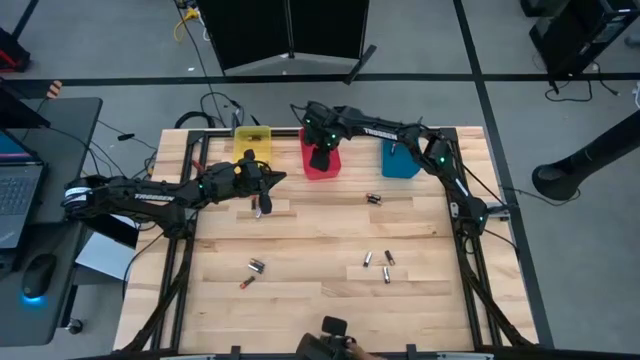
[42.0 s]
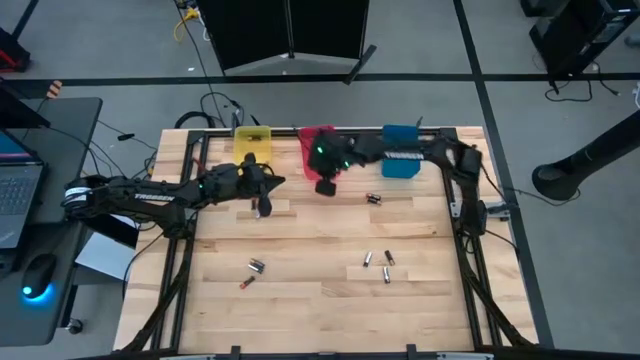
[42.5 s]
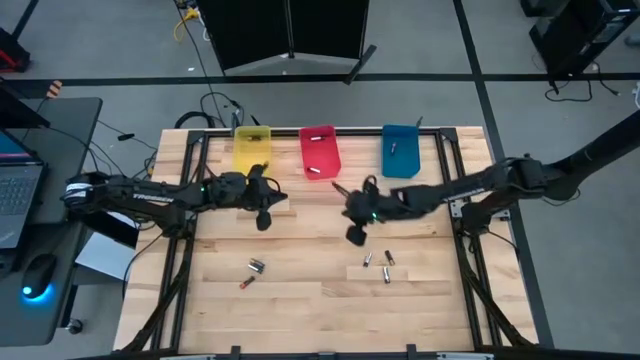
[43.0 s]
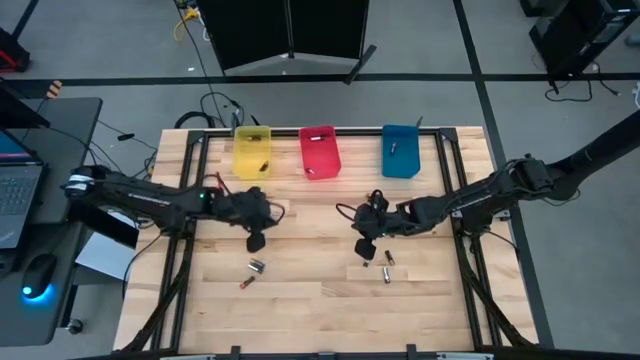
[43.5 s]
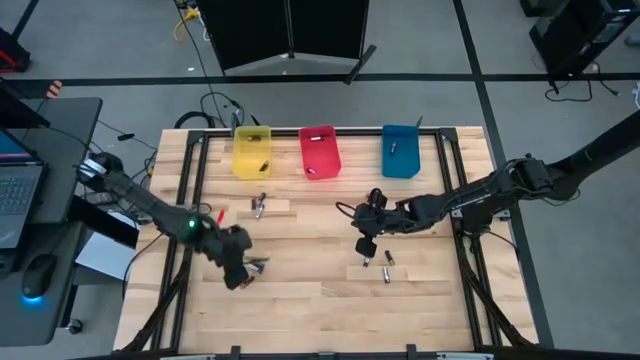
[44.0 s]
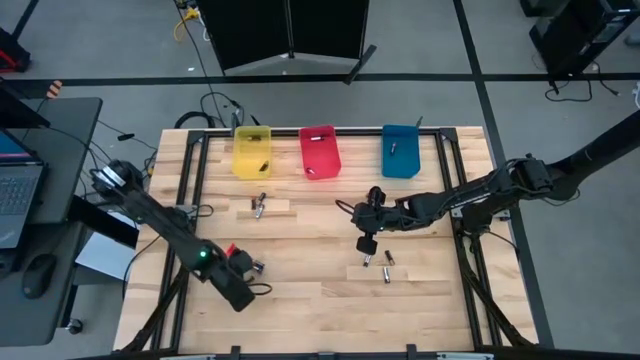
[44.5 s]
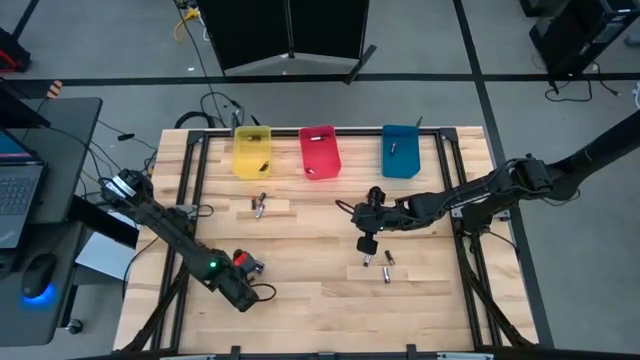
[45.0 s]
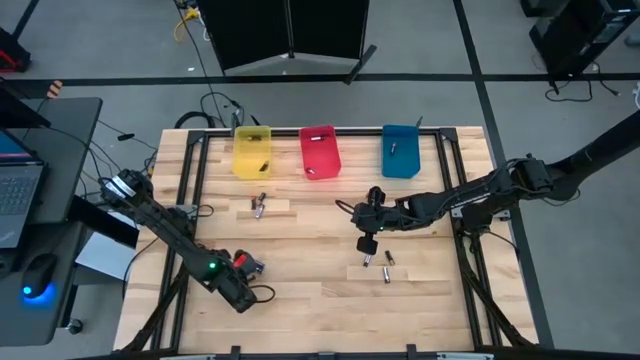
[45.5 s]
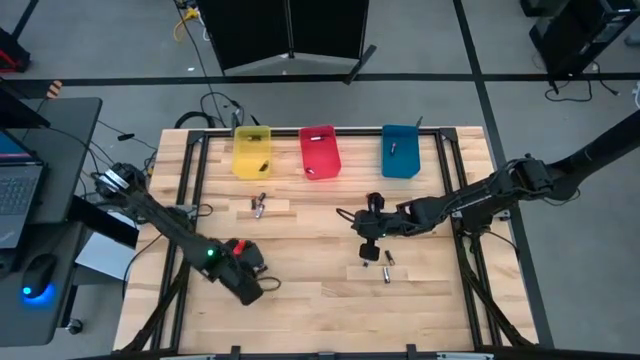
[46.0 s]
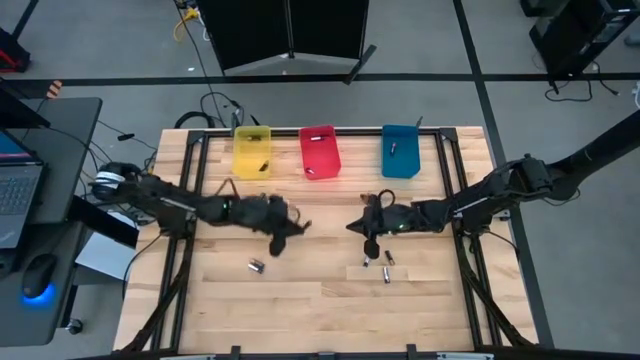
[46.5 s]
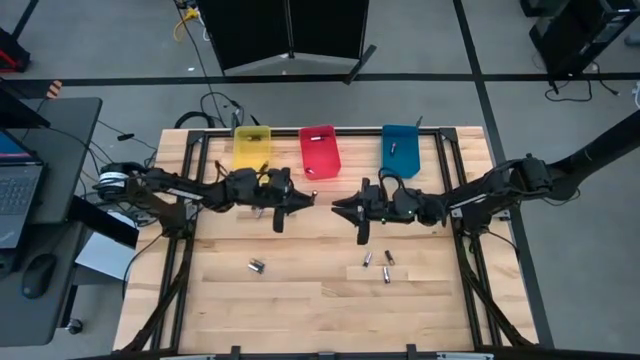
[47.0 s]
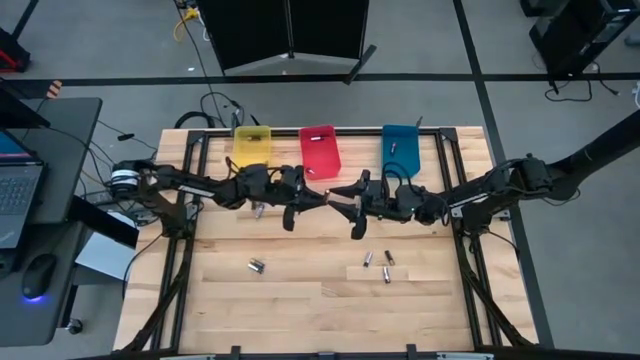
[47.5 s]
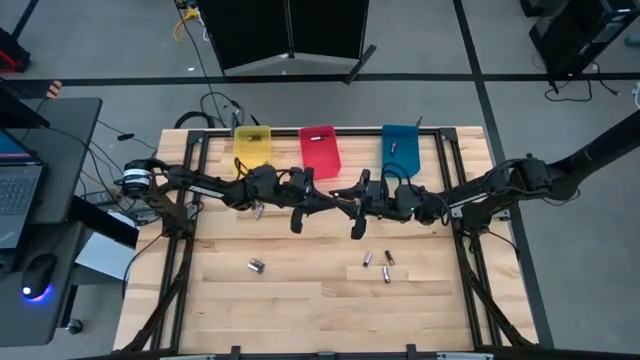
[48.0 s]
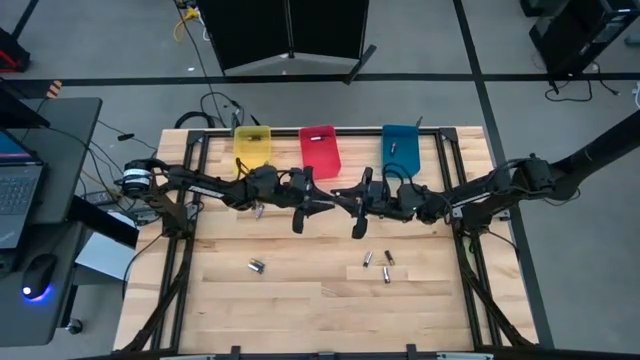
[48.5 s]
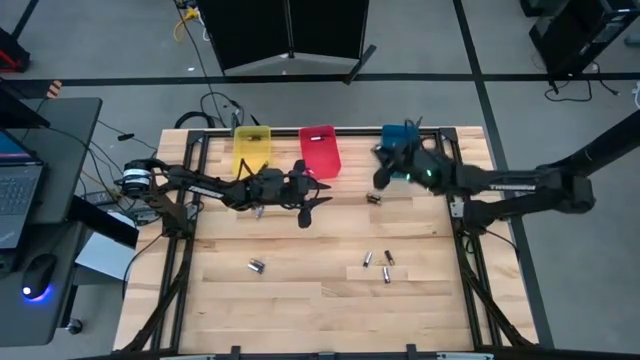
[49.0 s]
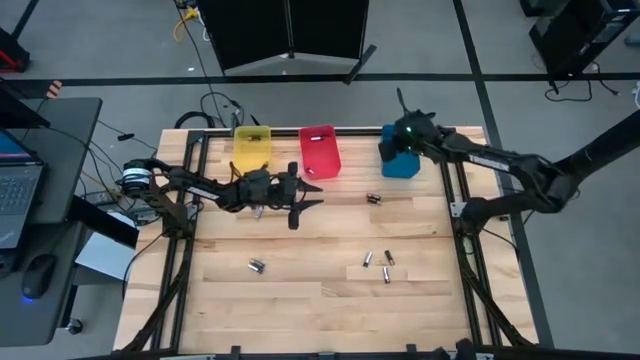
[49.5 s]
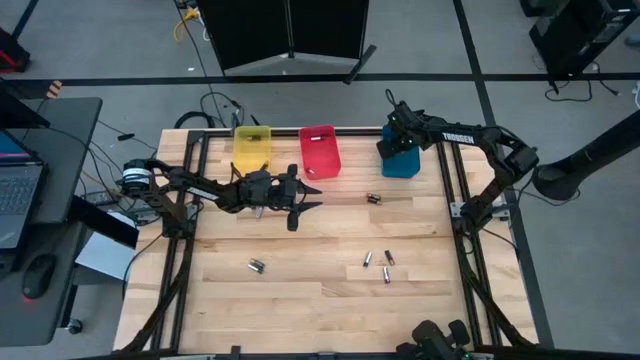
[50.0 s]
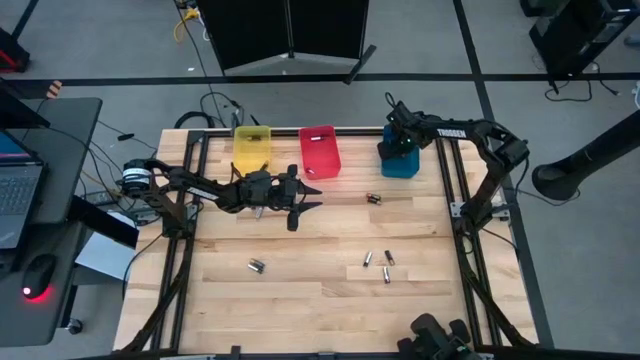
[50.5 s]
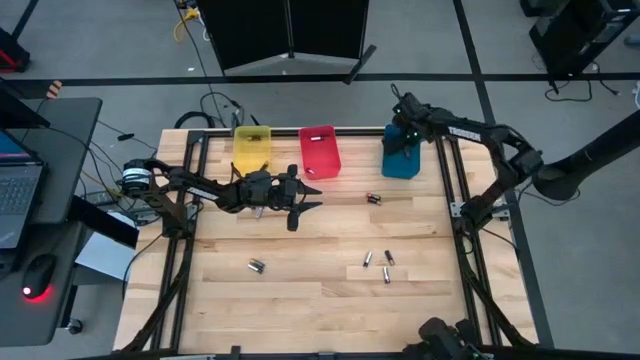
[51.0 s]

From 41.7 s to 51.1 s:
Task: Sort batteries
Put the bottom orange battery into the blue bin

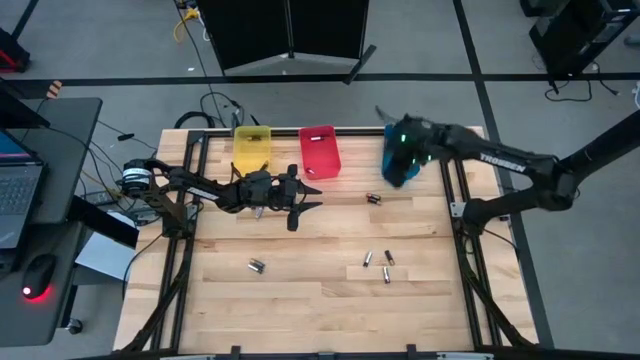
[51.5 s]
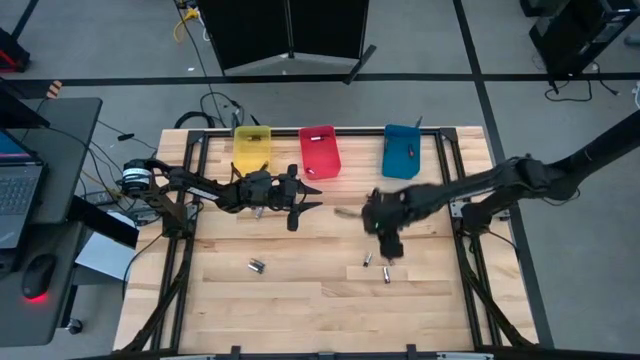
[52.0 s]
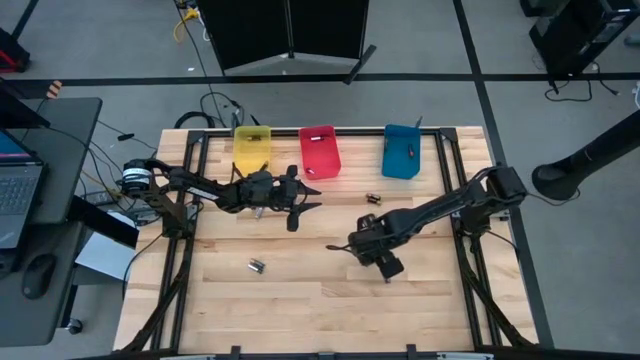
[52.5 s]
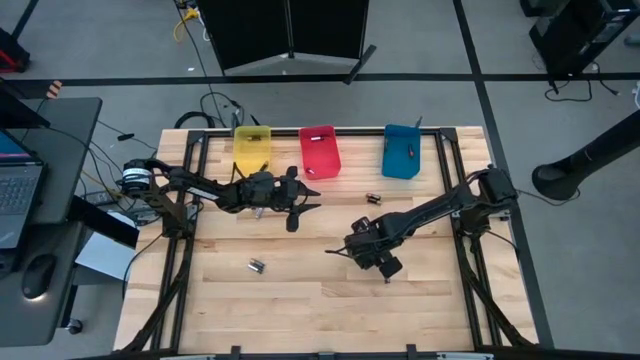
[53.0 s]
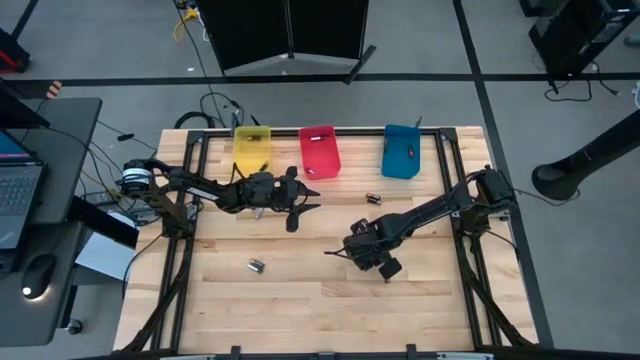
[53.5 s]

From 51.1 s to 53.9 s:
Put the silver battery into the red bin

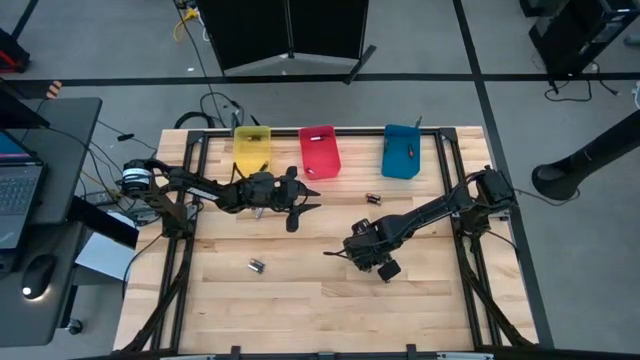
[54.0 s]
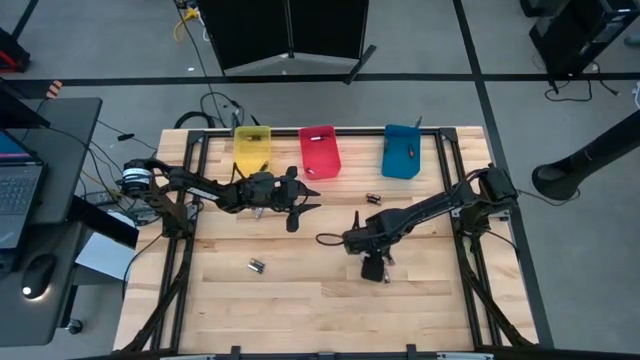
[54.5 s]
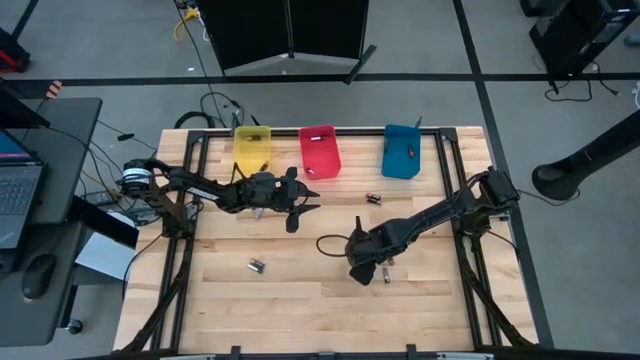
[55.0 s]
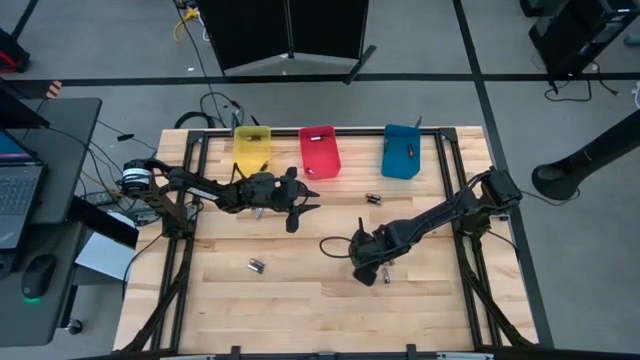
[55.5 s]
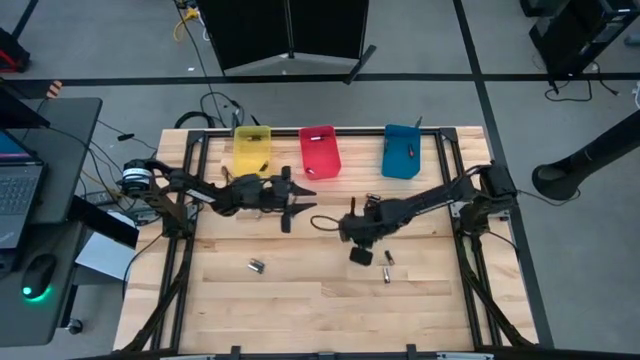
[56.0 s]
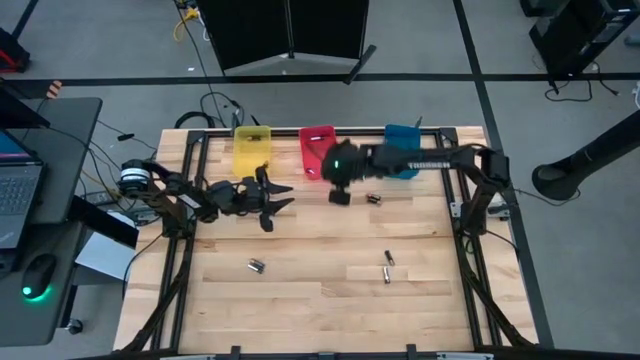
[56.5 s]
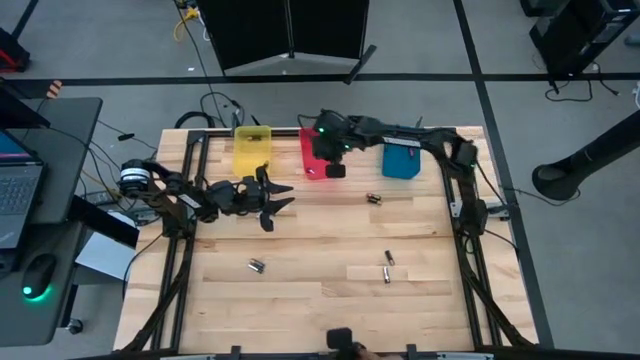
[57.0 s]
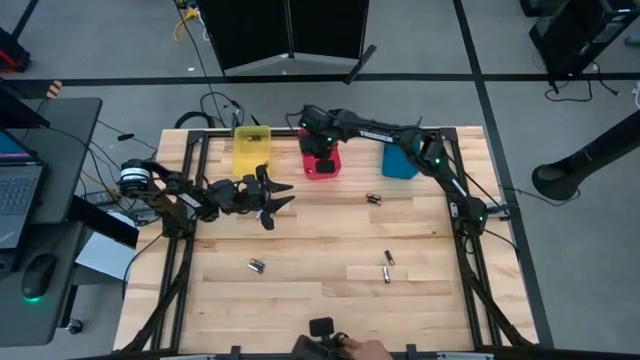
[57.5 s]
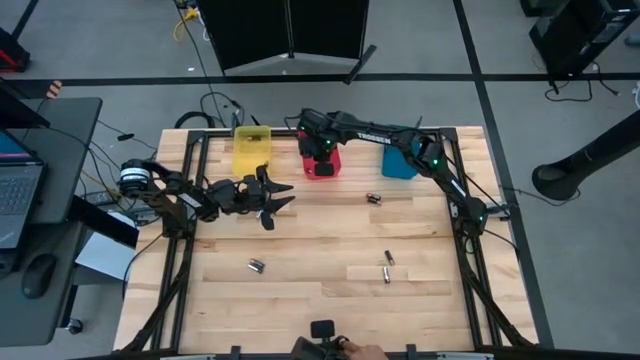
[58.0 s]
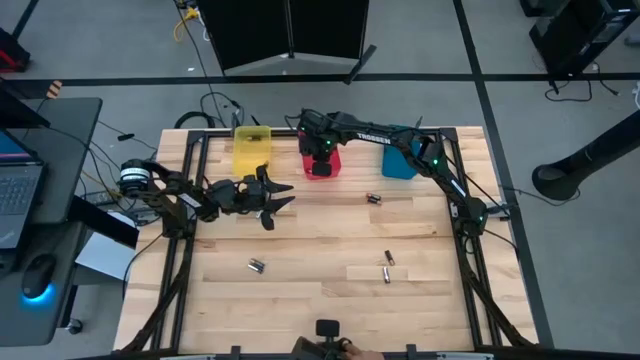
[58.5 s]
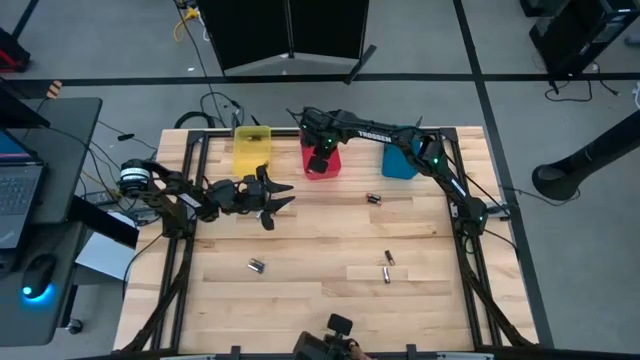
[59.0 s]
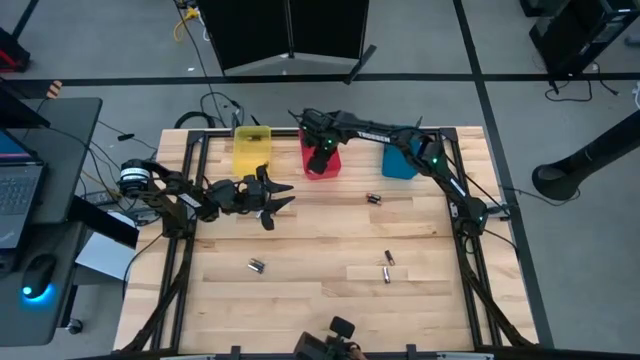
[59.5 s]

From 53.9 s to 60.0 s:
Put the silver battery into the red bin

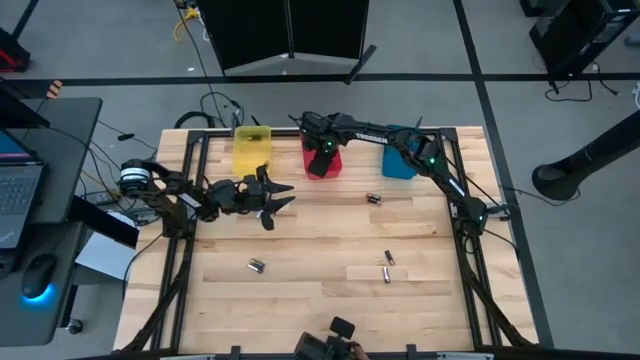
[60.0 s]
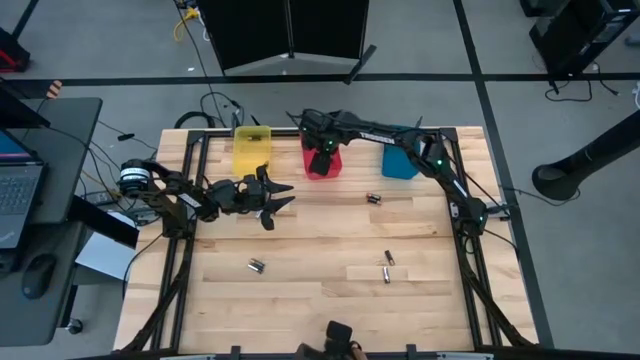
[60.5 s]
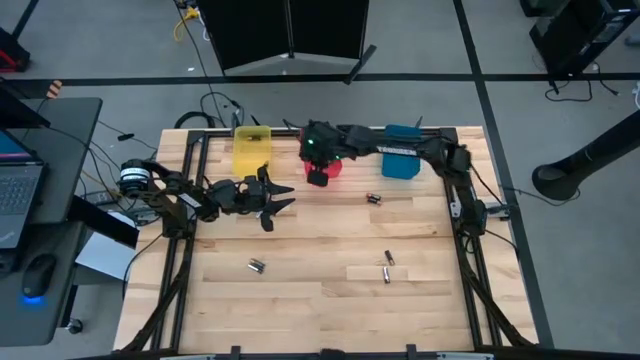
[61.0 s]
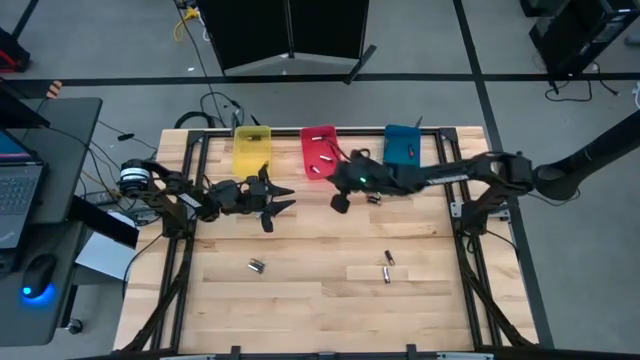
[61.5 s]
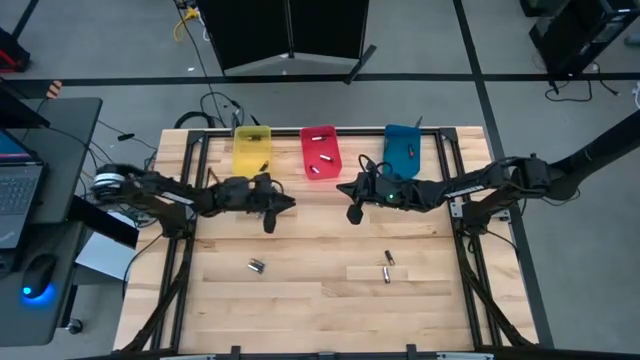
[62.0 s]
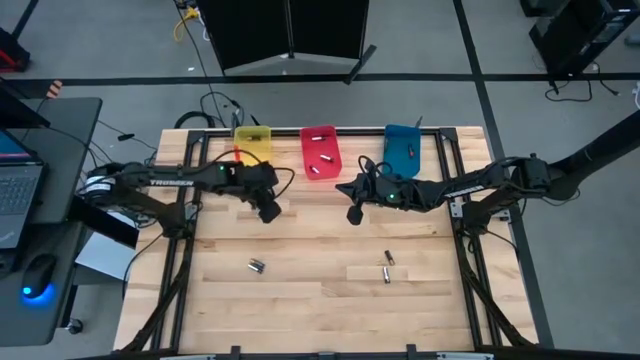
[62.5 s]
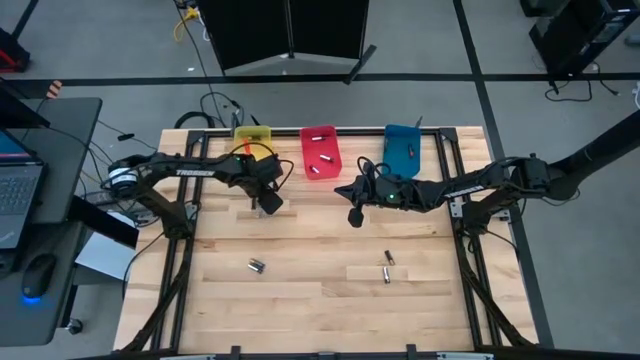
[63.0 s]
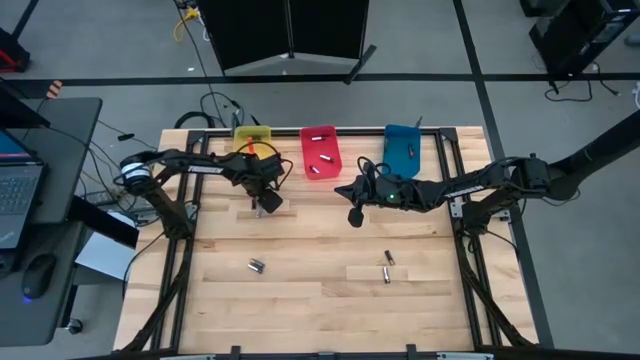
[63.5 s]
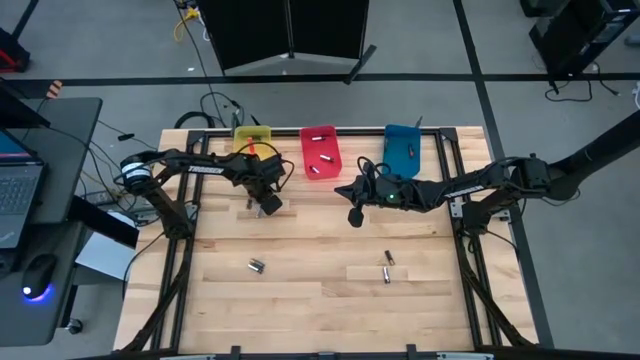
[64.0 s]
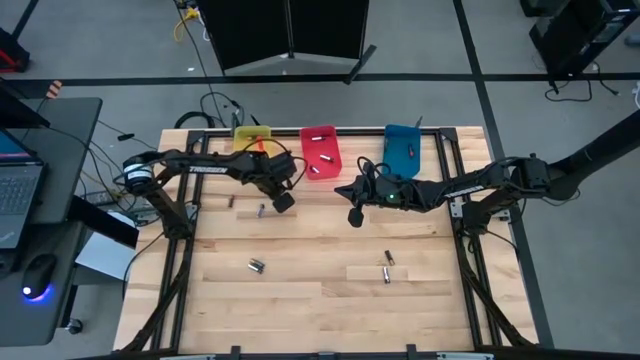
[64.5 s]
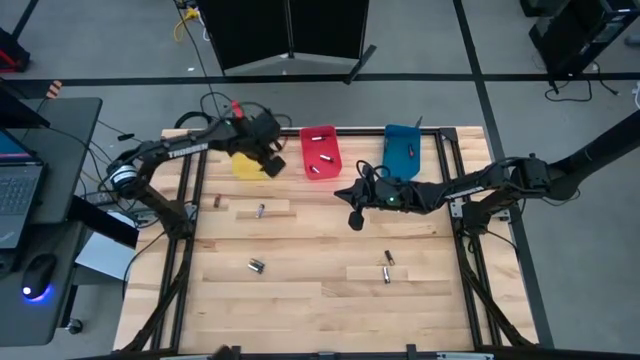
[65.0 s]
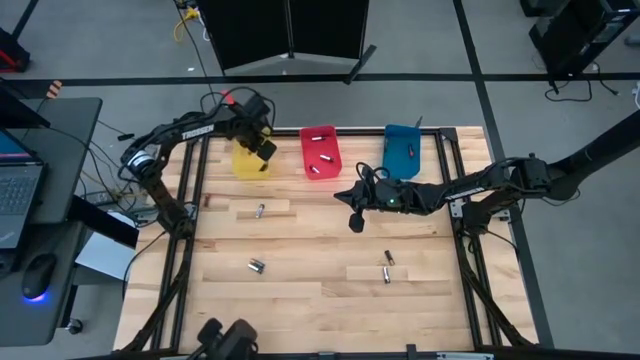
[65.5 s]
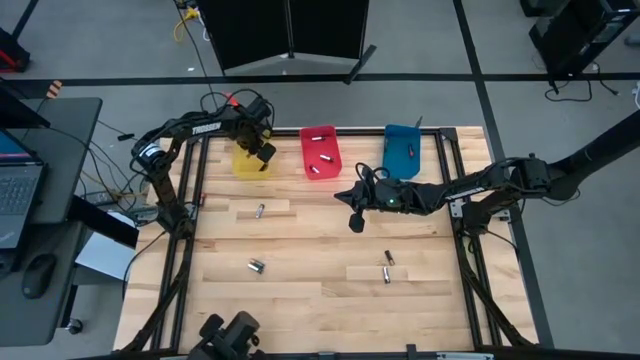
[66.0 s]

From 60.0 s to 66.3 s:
Put the brown battery into the yellow bin
